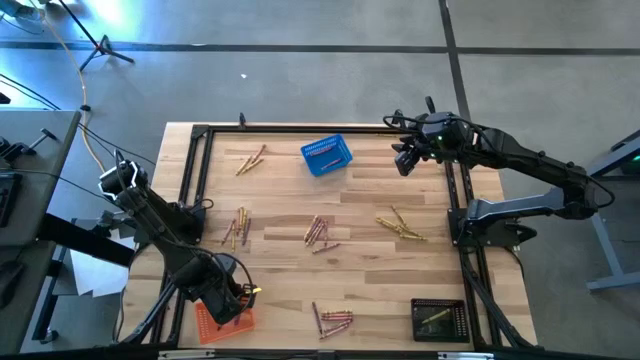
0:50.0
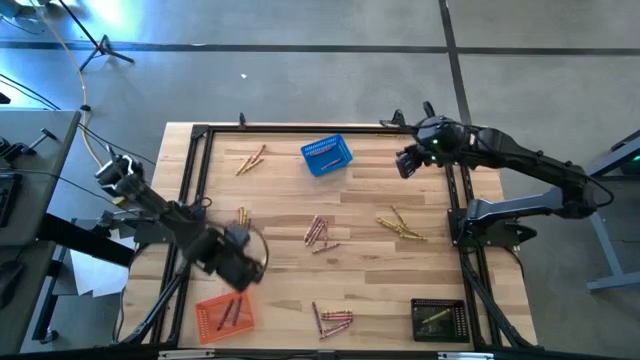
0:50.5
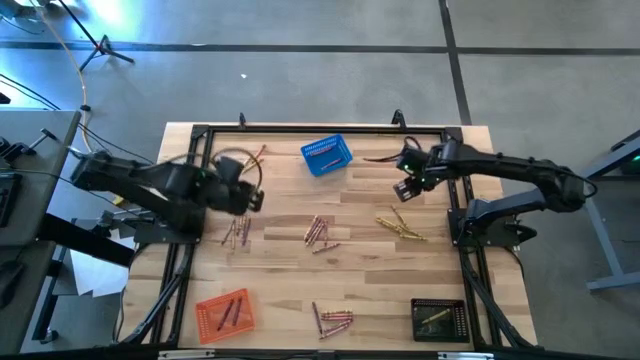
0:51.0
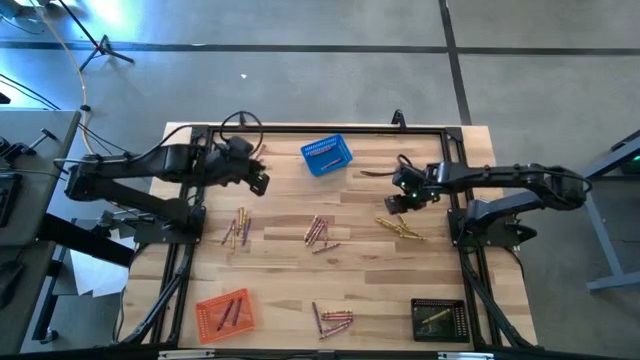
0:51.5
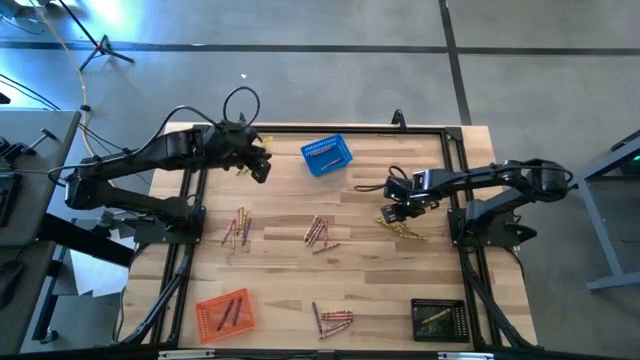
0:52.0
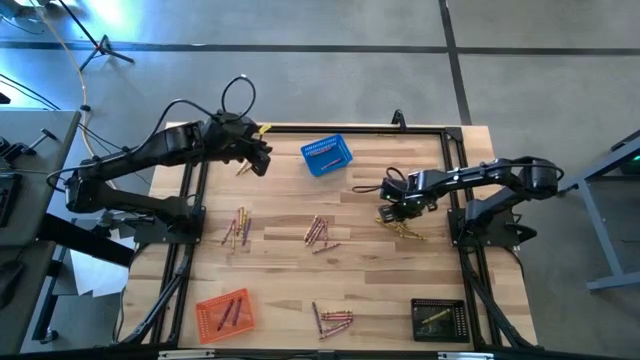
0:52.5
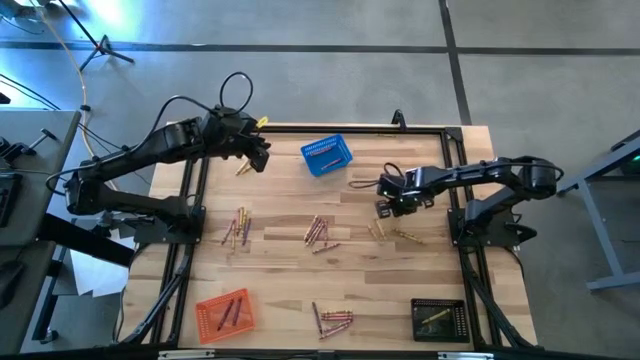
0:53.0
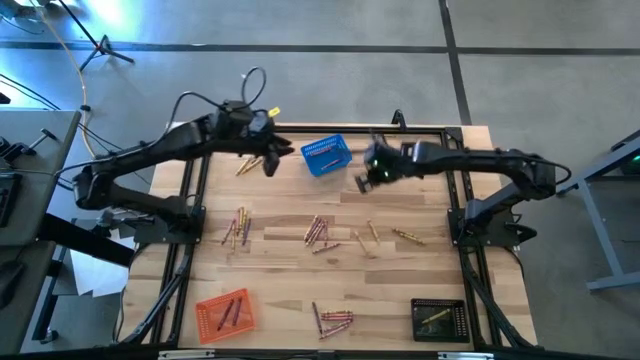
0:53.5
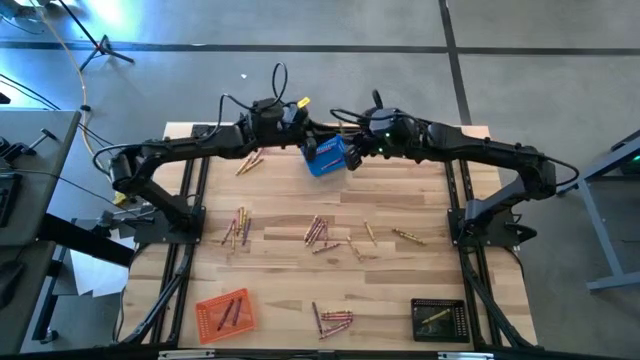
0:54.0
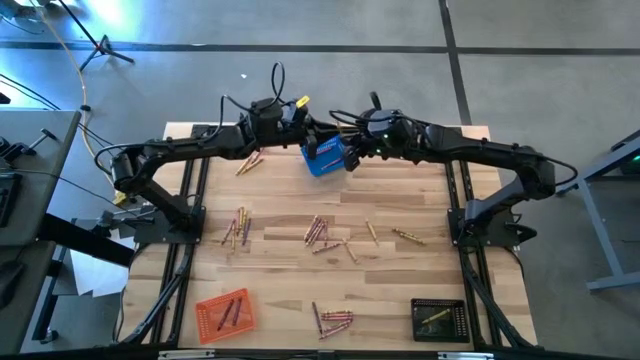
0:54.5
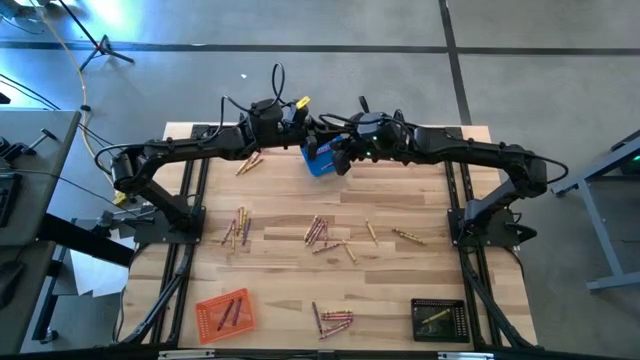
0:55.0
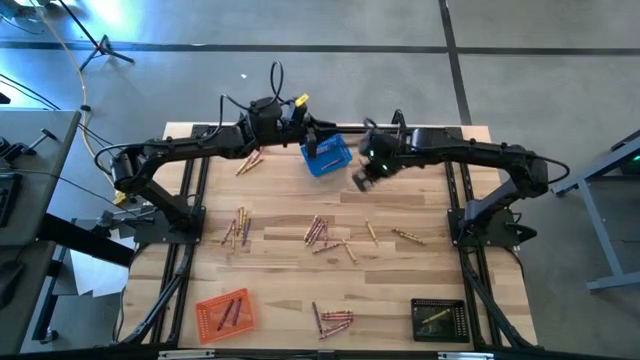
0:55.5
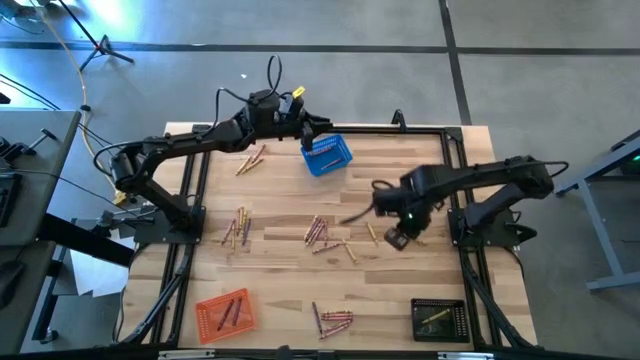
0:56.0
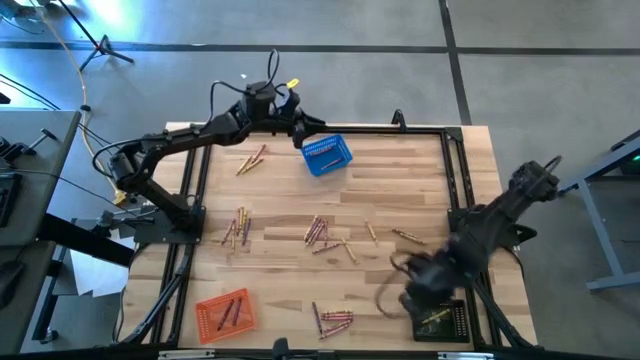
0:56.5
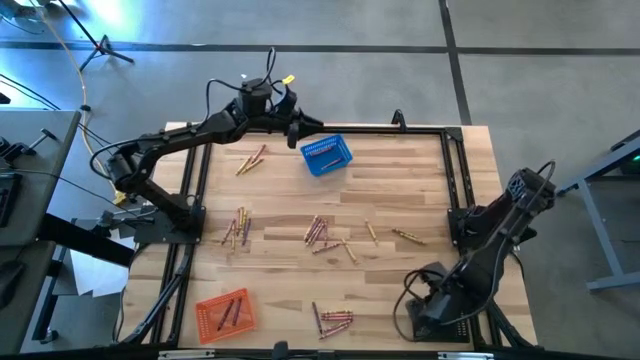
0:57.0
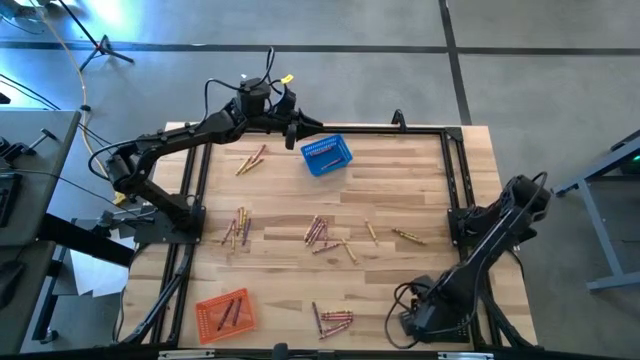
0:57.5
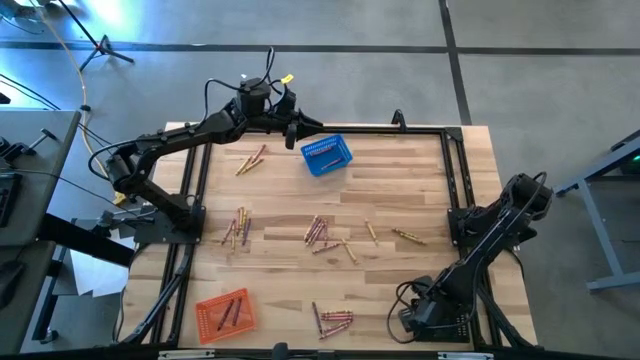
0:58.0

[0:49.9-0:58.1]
Task: Sort crayons
Put the yellow crayon into the black bin

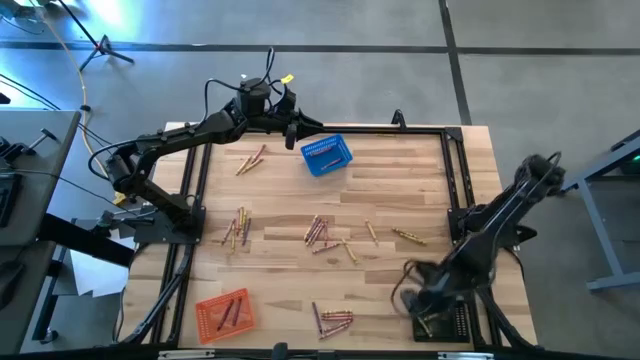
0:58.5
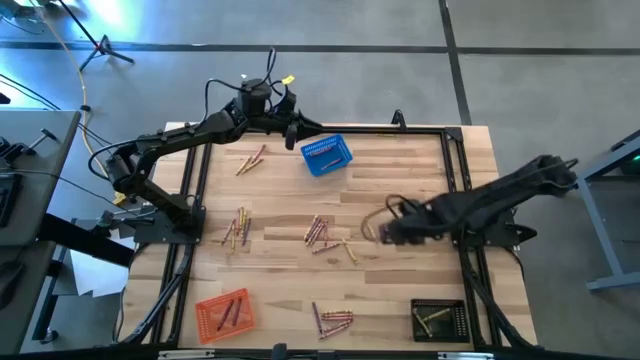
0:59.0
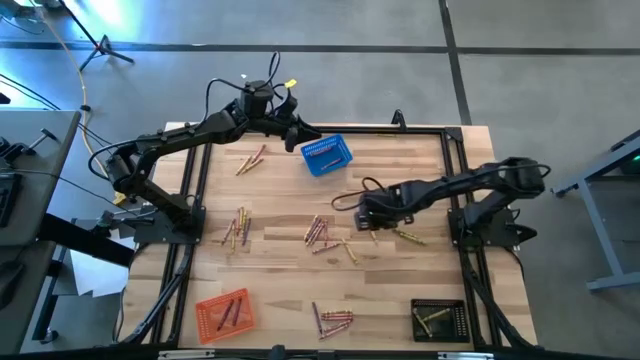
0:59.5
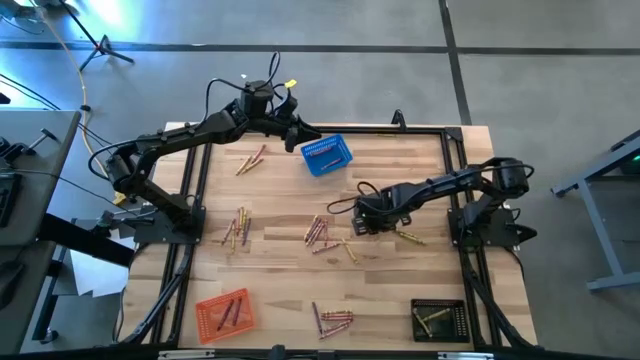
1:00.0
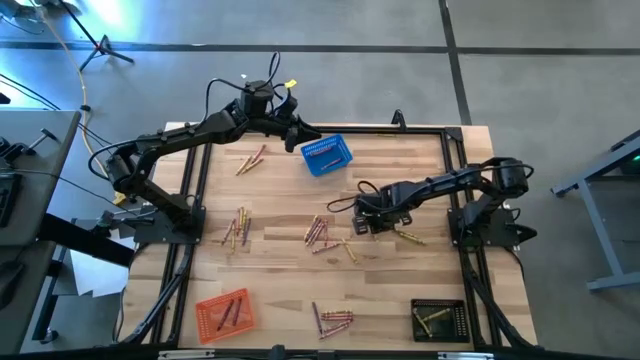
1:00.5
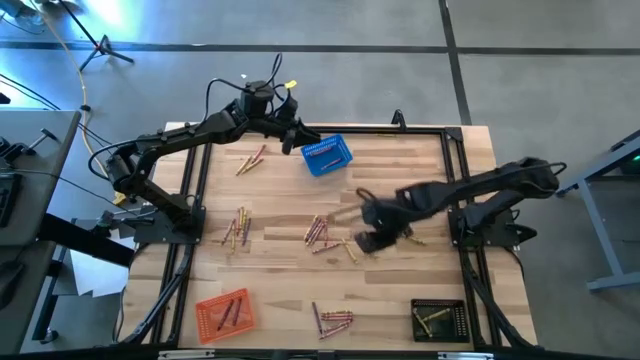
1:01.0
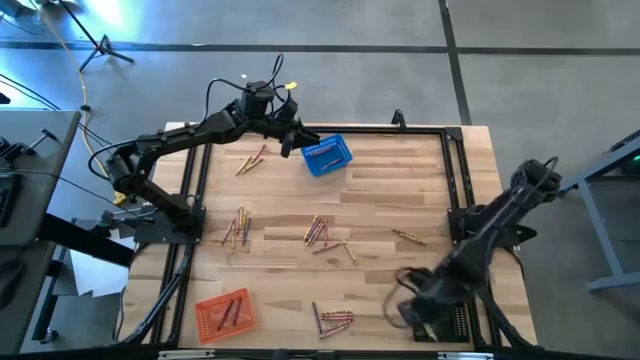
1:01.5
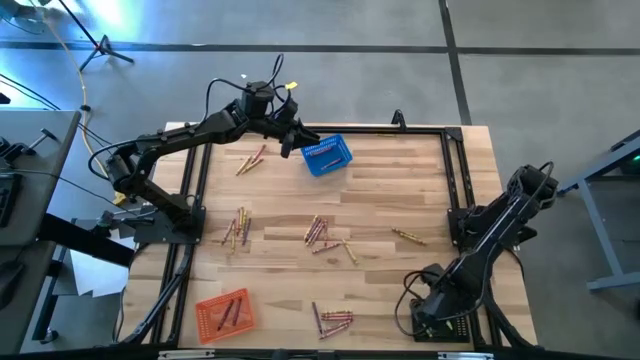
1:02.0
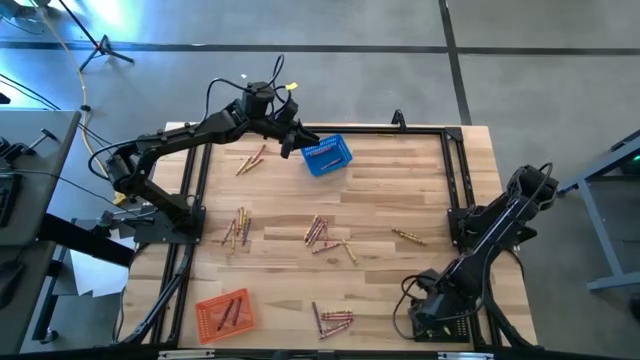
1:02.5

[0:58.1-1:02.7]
Put the yellow crayon into the black bin

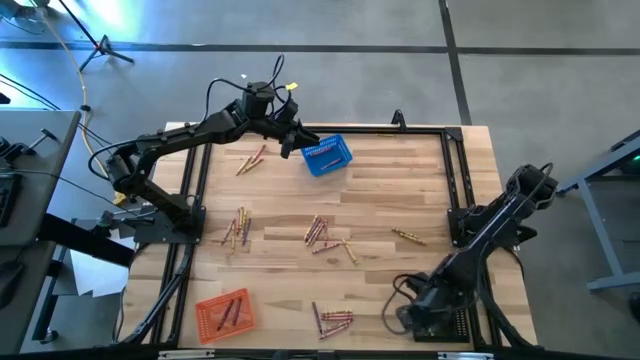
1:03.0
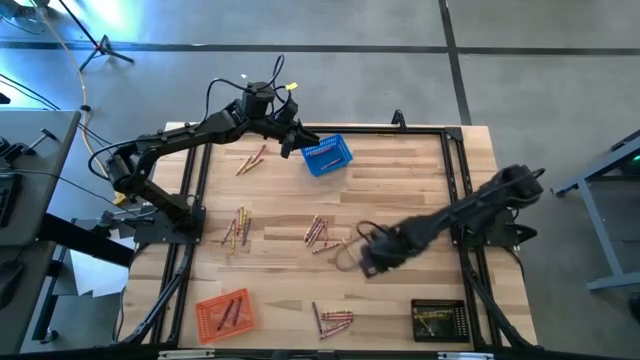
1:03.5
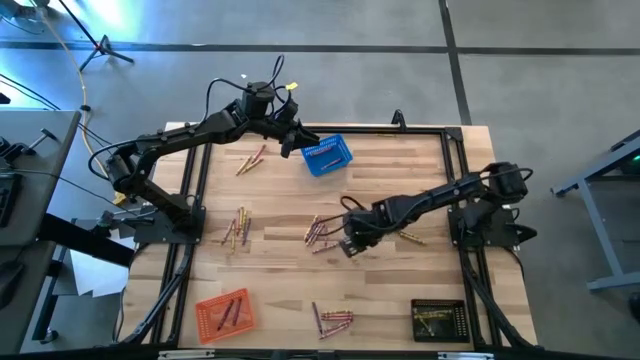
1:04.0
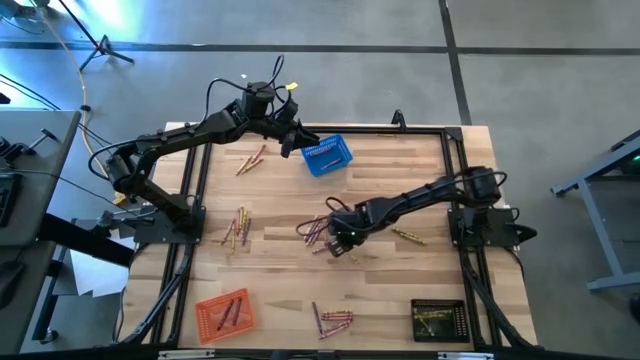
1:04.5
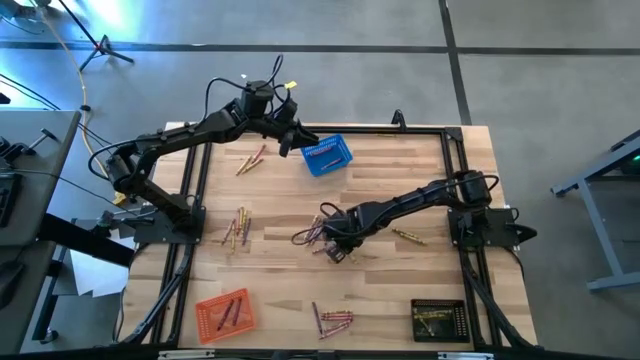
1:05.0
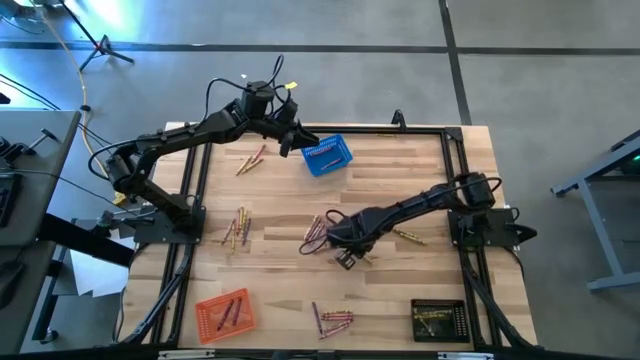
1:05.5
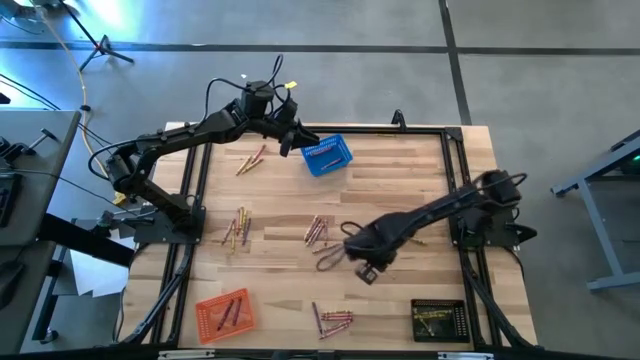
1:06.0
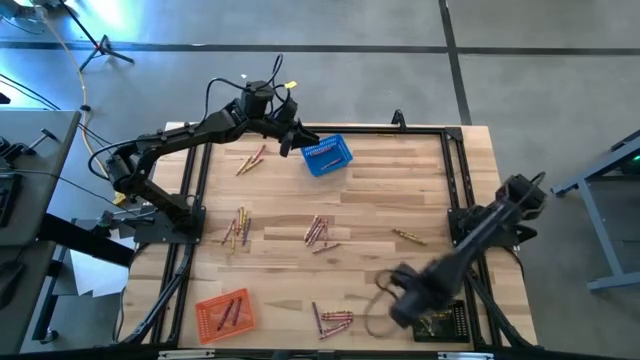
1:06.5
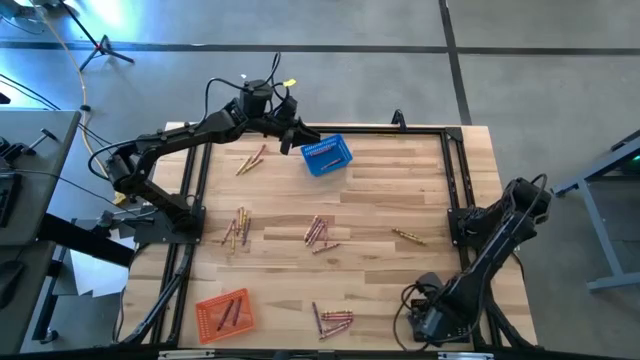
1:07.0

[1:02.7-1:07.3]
Put the yellow crayon into the black bin

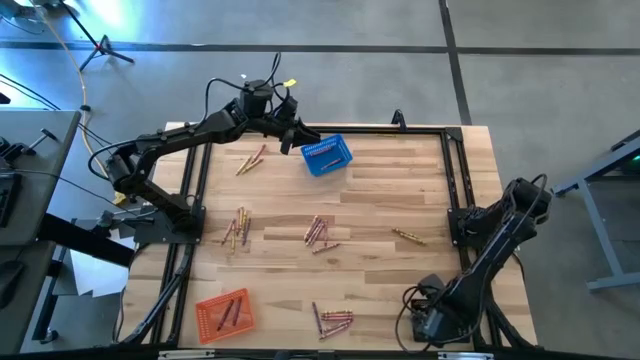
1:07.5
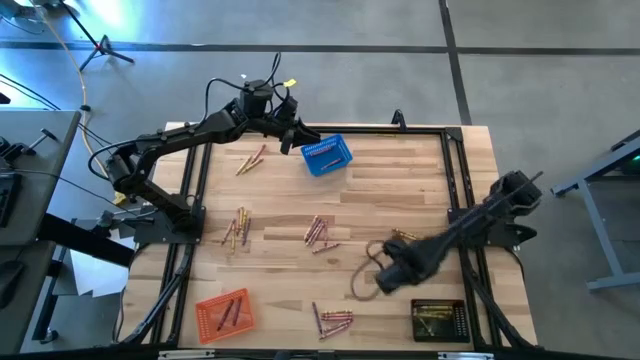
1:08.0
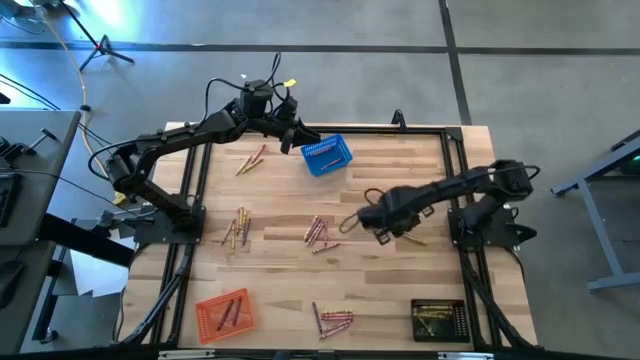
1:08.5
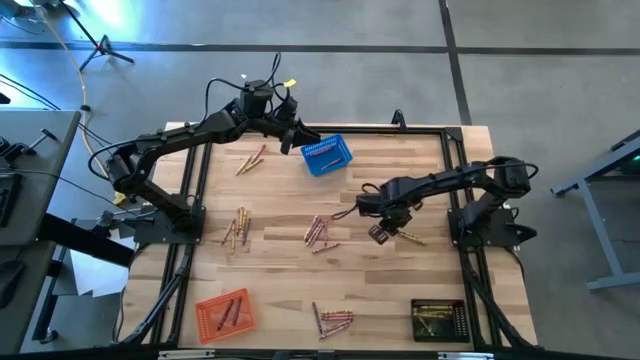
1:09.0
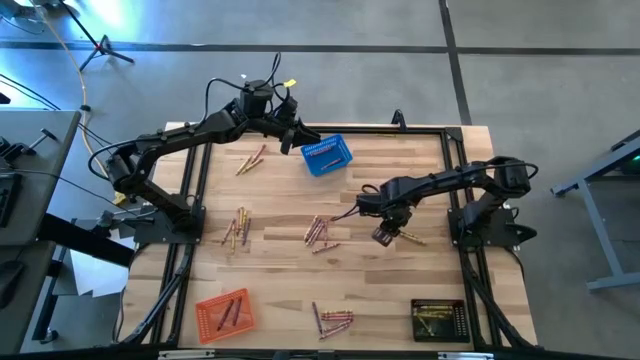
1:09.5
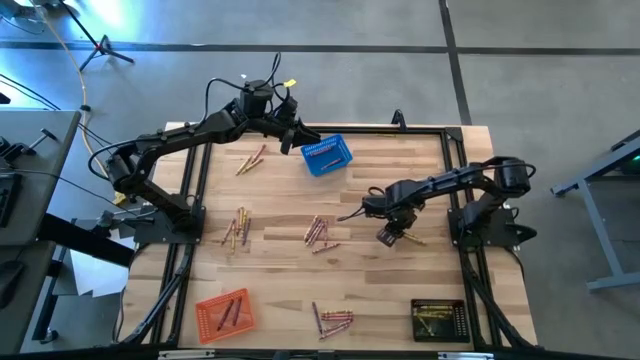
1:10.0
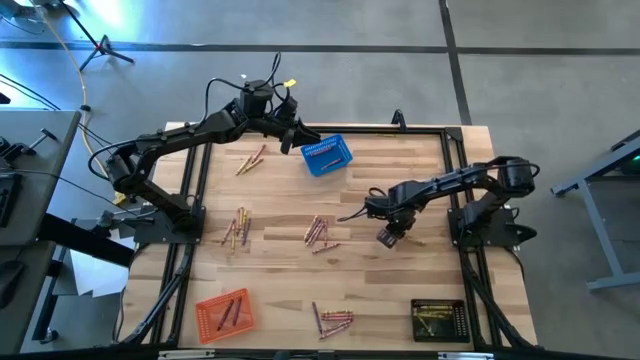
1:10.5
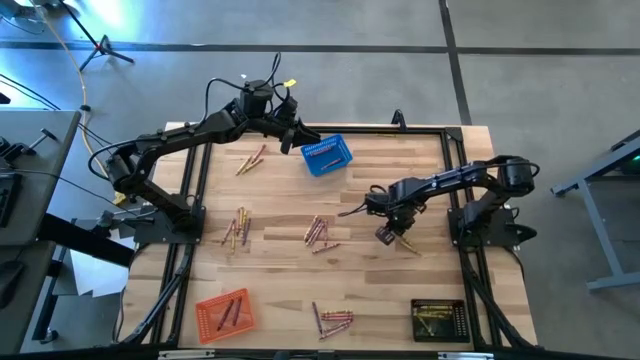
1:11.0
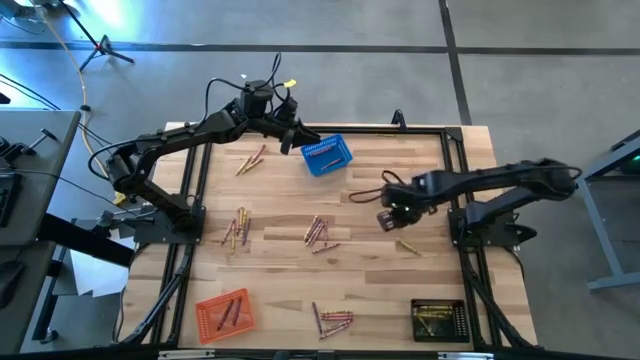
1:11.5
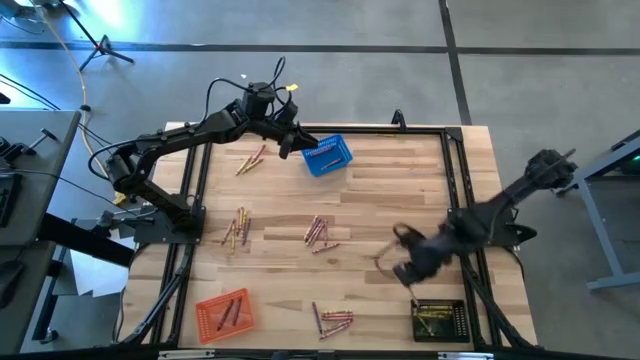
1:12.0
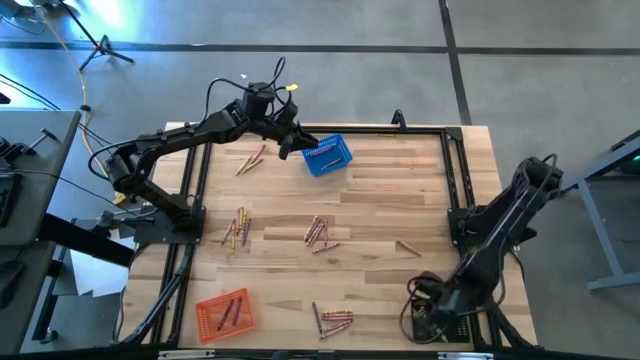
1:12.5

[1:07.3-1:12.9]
Put the yellow crayon into the black bin
